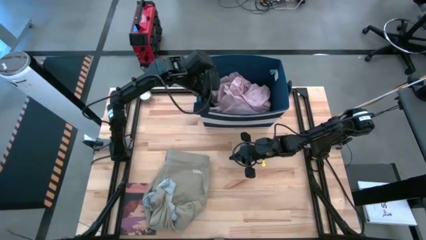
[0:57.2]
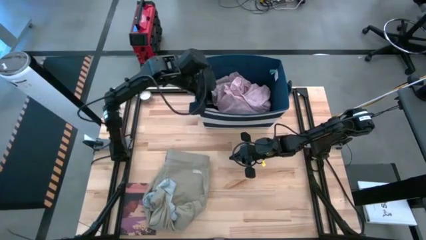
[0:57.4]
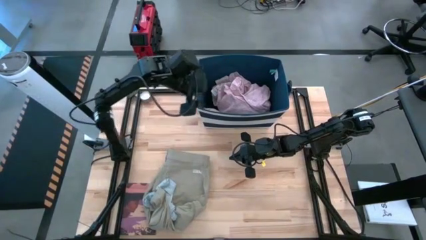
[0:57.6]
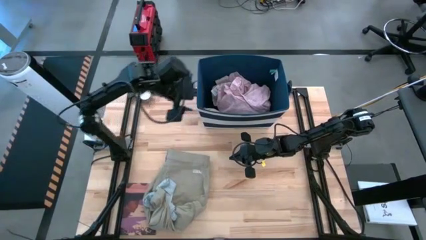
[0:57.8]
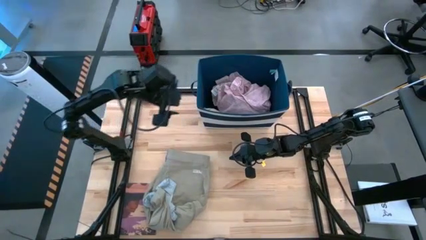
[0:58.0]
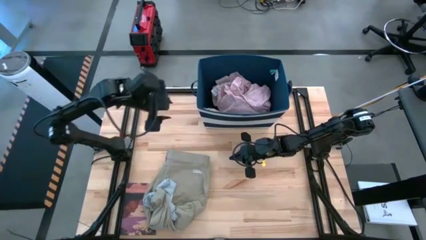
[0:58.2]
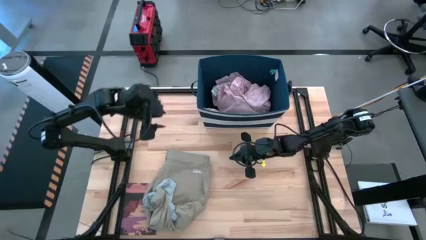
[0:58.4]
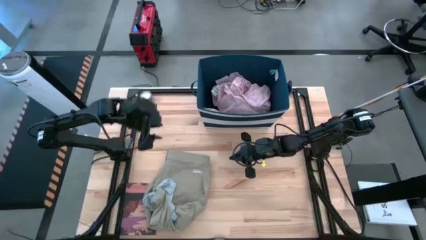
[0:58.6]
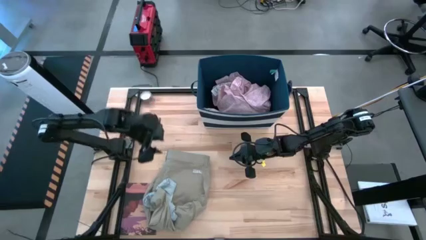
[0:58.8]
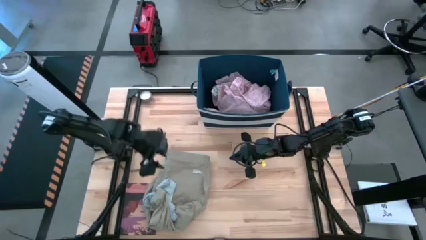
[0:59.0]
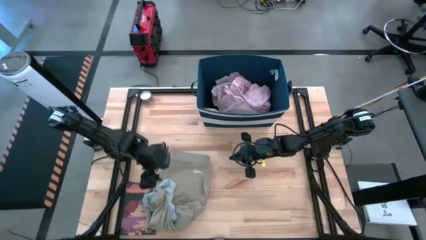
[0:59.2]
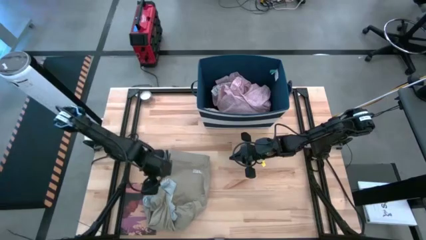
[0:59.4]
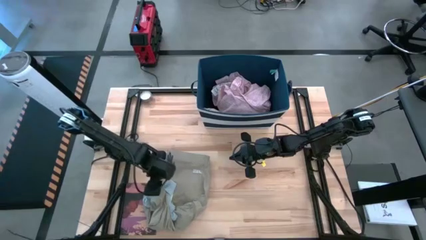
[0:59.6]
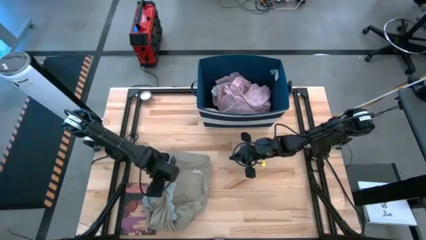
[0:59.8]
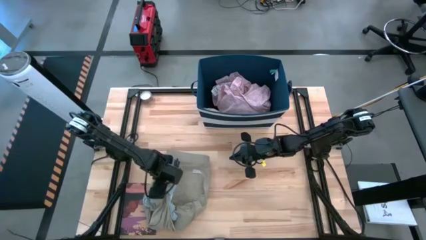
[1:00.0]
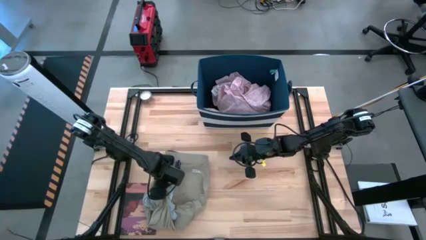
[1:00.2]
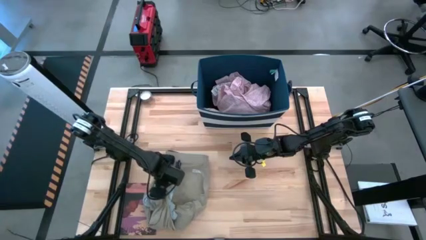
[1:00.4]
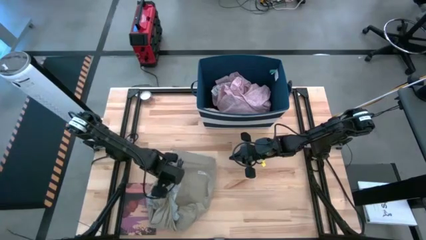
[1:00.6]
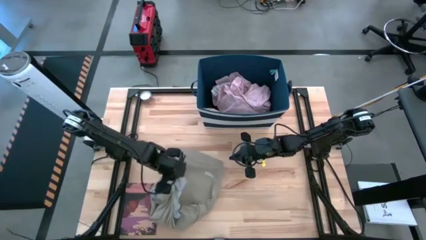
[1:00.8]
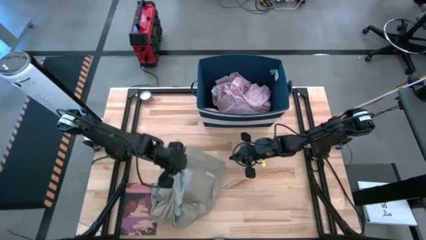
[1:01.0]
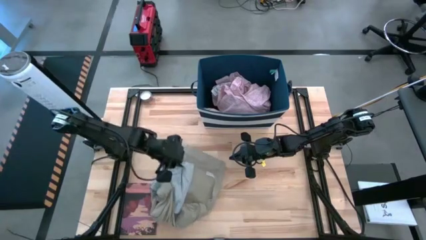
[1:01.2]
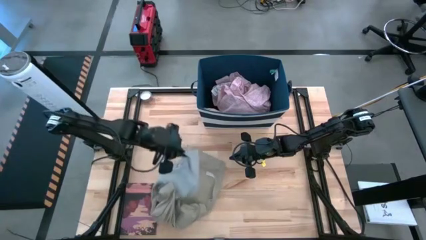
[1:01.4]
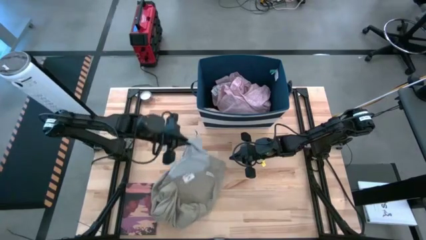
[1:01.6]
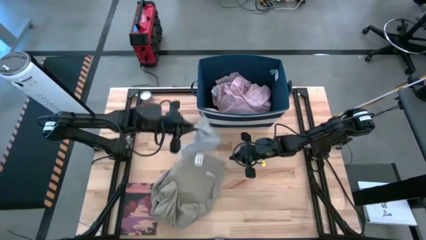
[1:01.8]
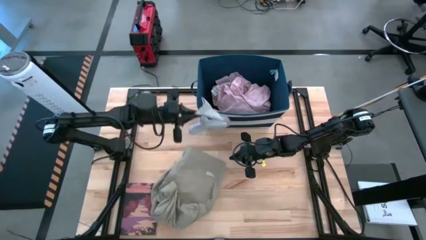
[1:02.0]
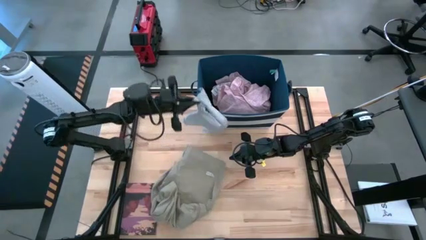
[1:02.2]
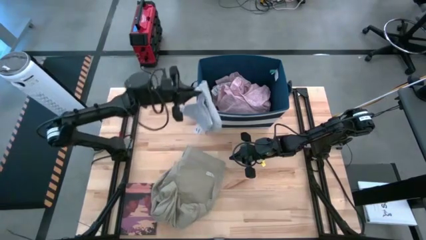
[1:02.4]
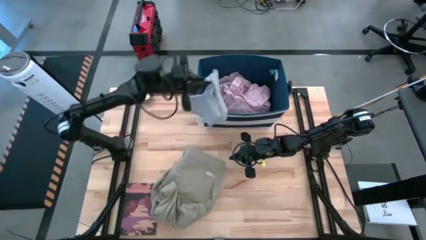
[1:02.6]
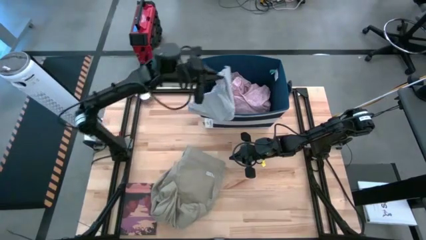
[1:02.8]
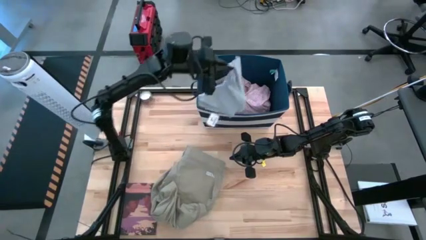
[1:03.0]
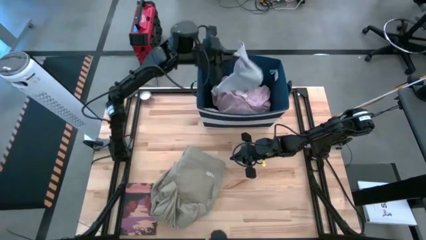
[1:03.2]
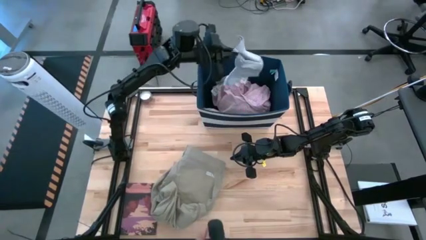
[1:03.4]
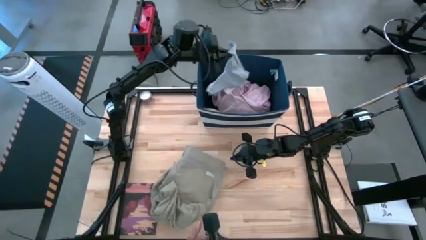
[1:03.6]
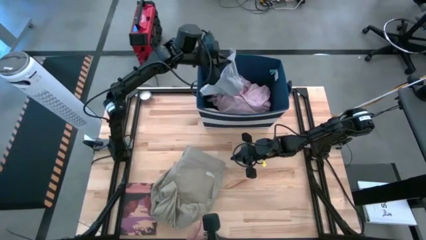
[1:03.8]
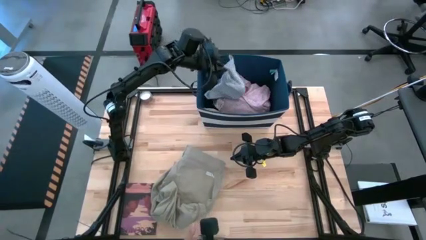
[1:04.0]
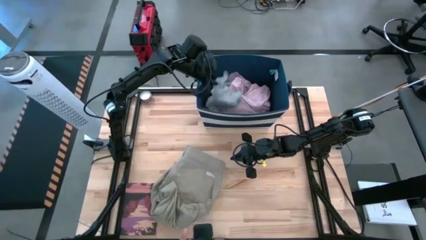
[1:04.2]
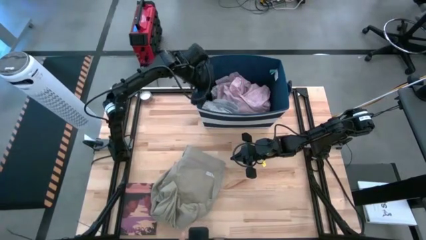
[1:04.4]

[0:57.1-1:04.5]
Task: Sort clothes
Put the gray underwear into the laundry bin

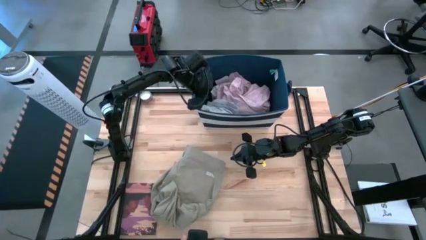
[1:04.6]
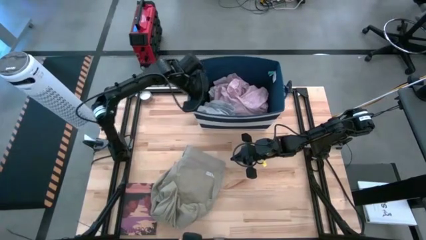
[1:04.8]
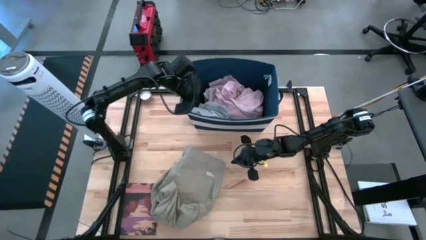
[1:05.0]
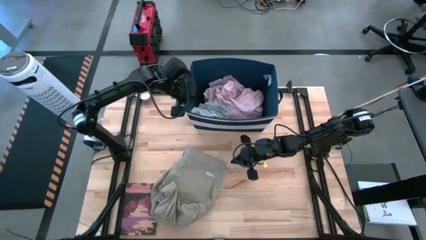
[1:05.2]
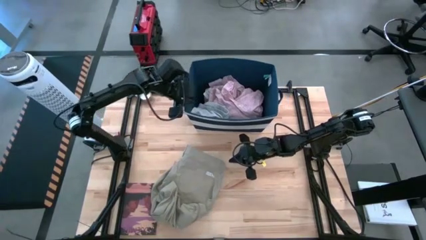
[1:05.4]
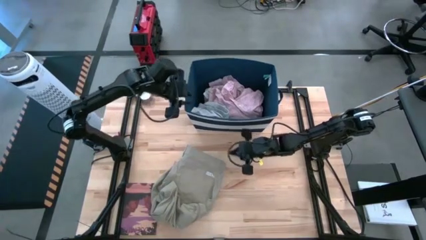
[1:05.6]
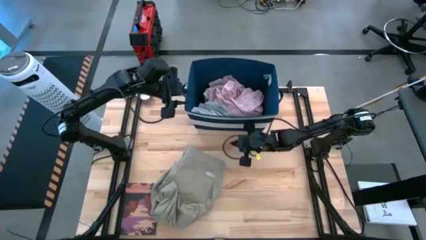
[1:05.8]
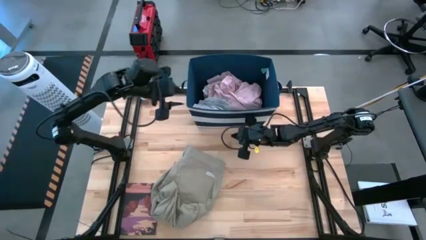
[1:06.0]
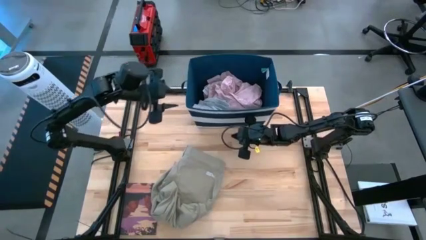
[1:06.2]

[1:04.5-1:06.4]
Adjust the laundry bin

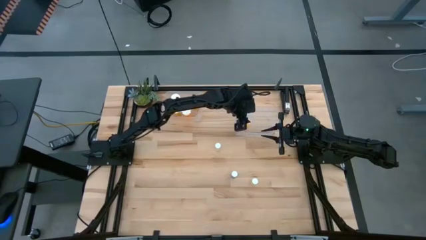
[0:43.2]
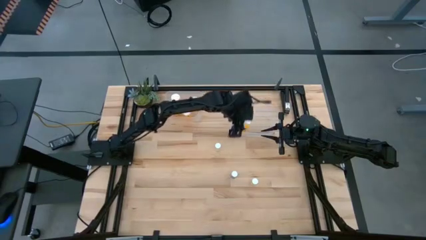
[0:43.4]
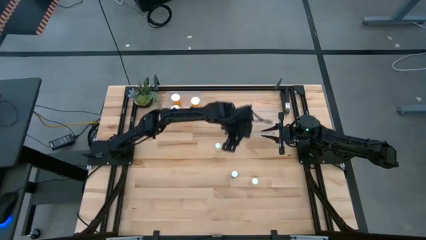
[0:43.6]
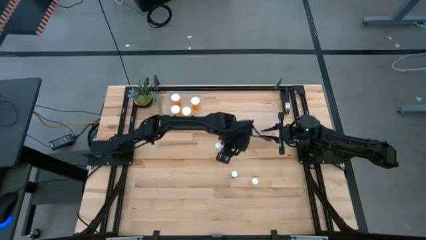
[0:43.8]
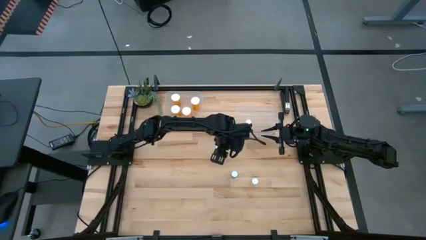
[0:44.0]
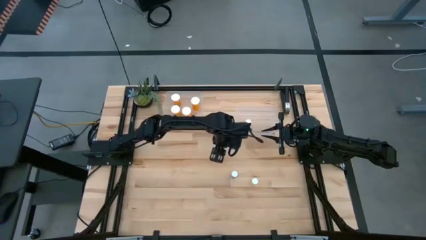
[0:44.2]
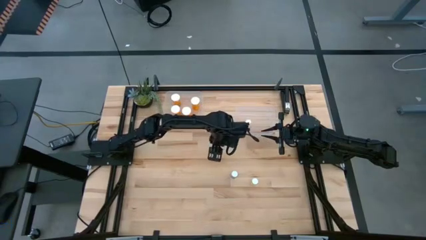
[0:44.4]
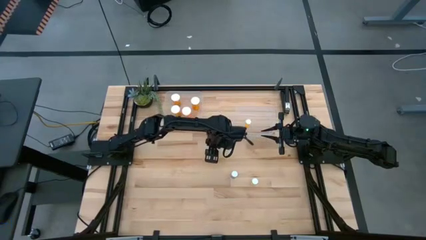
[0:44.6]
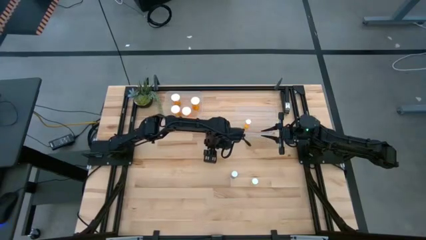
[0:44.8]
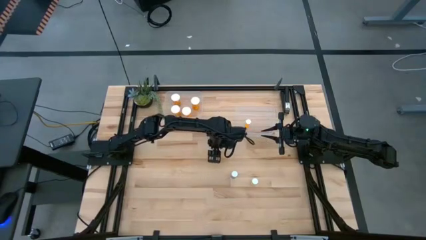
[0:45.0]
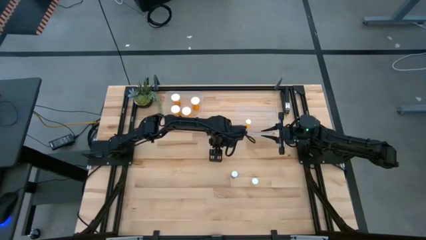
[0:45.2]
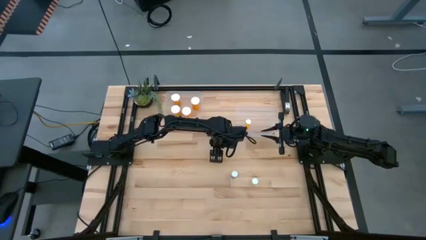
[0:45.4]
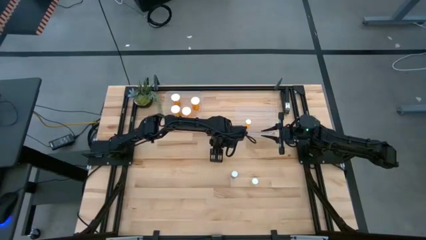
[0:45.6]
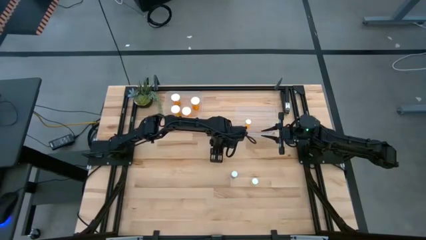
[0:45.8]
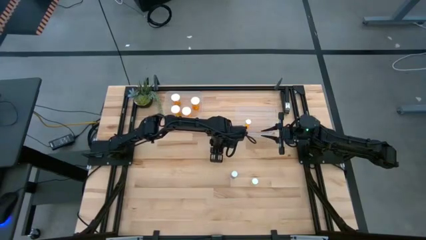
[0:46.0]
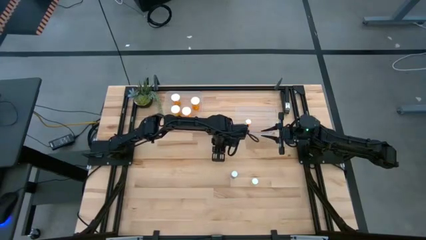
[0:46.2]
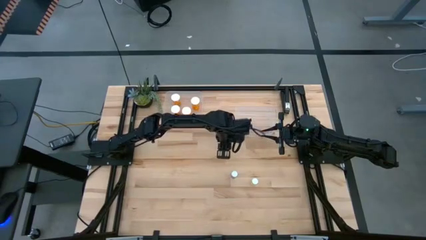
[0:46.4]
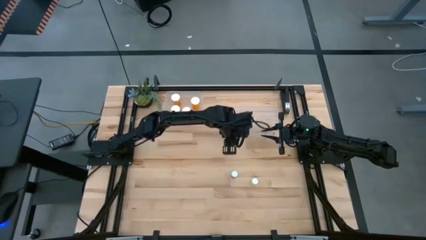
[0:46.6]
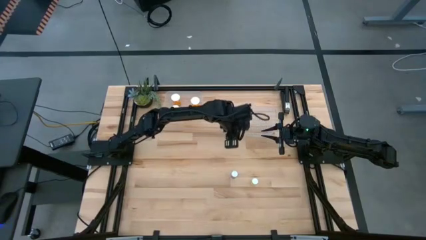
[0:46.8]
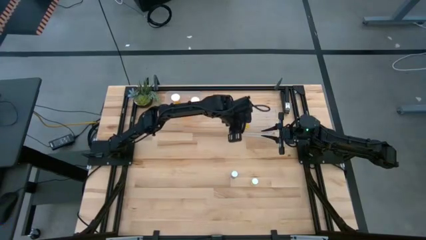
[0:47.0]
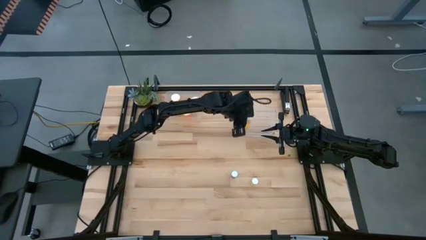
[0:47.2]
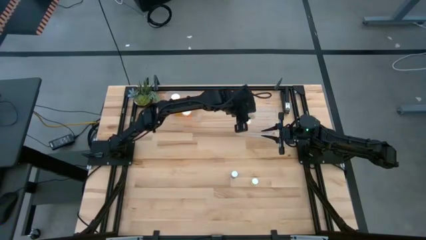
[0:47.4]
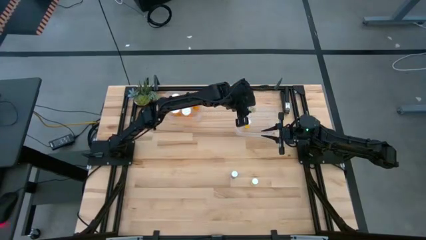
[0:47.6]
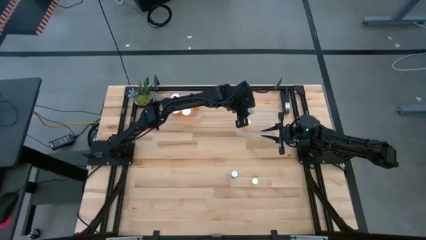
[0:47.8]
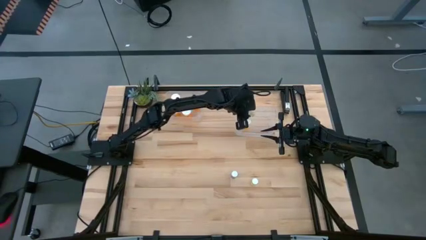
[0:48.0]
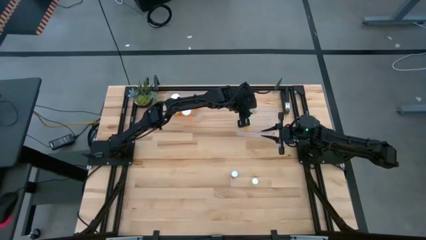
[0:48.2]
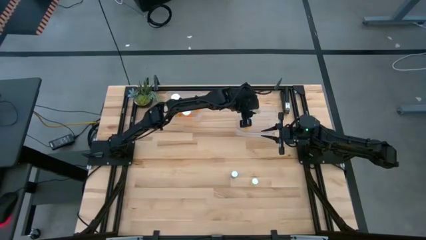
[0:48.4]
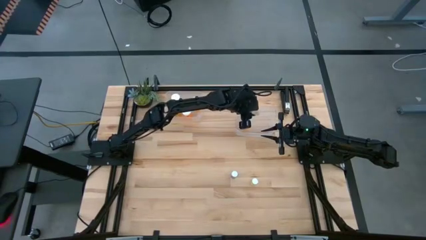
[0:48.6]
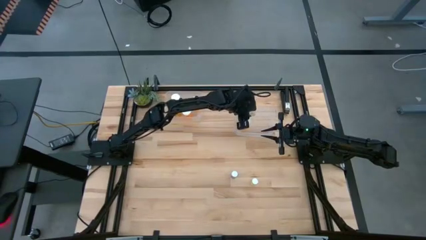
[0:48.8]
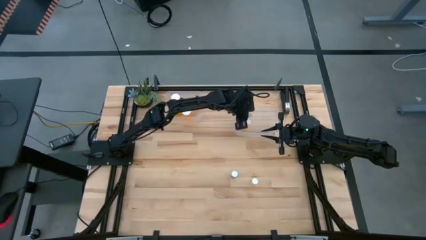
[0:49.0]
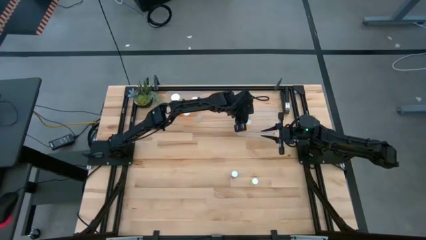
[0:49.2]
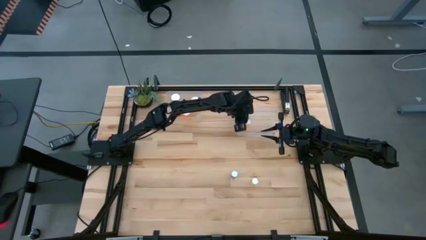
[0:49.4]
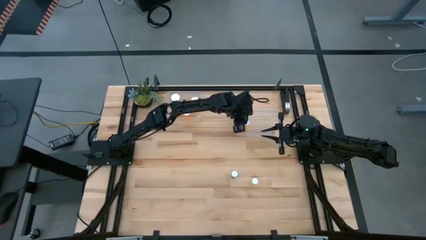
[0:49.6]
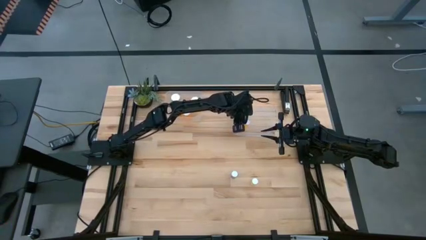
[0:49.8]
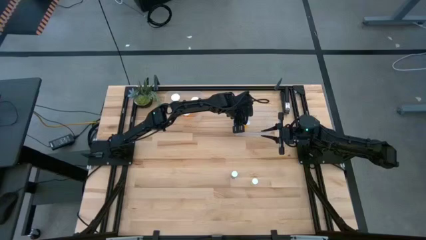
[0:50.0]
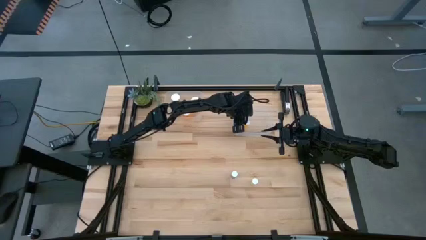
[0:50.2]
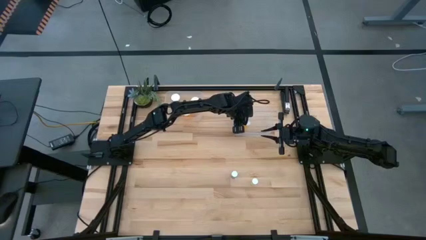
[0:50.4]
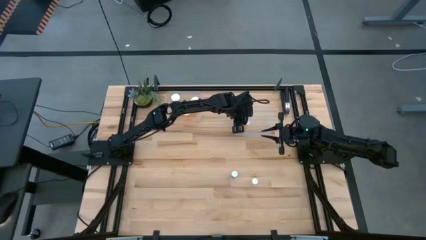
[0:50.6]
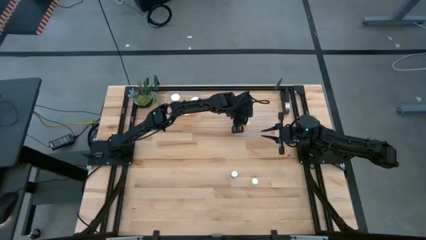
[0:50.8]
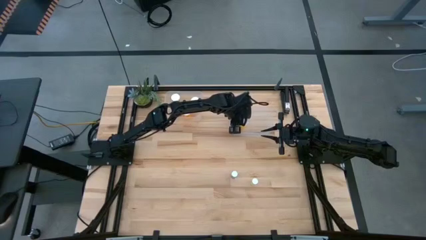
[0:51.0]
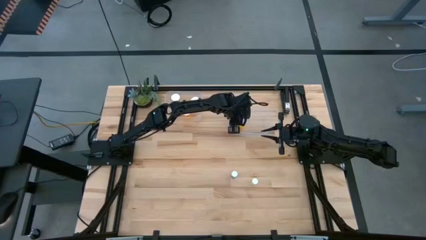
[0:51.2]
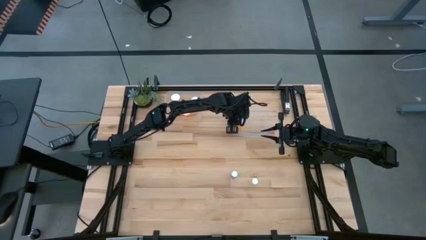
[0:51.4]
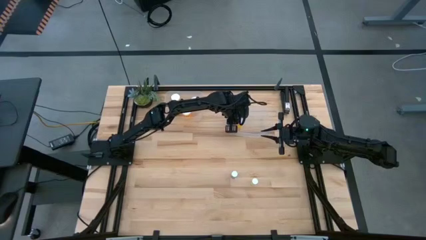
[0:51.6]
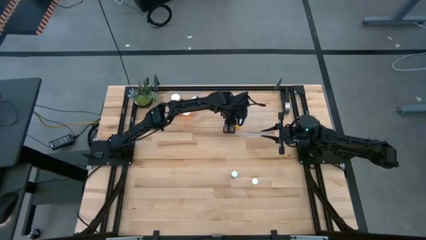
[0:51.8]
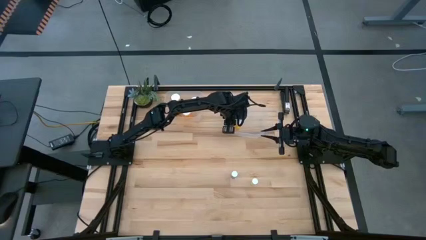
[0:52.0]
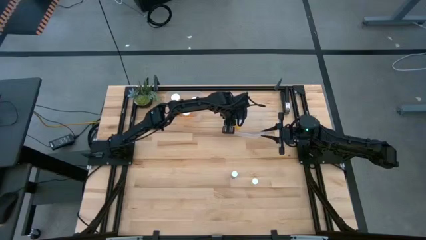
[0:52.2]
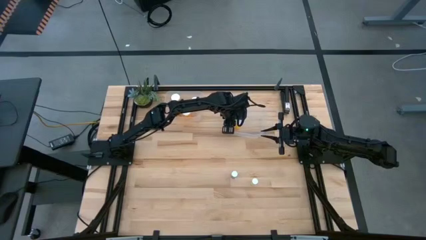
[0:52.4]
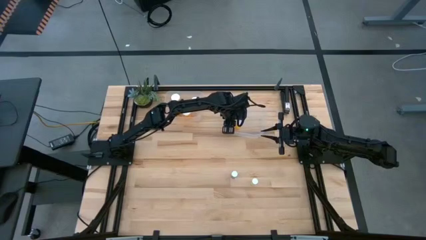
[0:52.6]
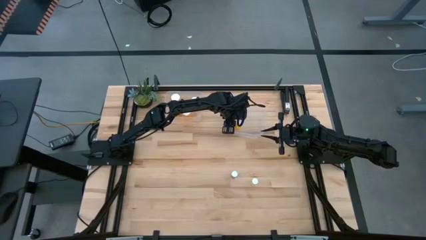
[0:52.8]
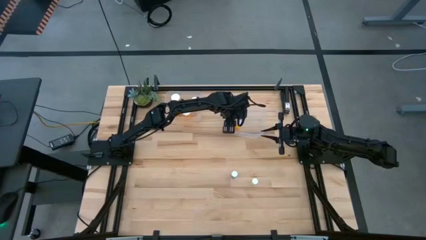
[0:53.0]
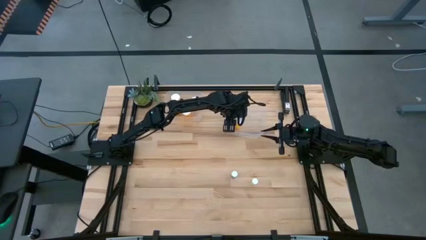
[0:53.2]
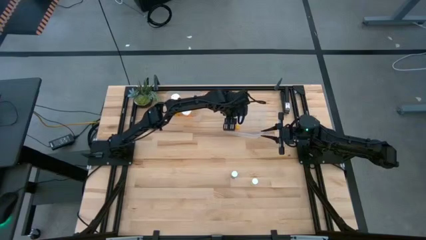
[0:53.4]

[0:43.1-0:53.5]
Task: Pick and place medicine bottles into bin by pill shape (circle, oval)
Put the small yellow pill bottle into the right transparent bin
